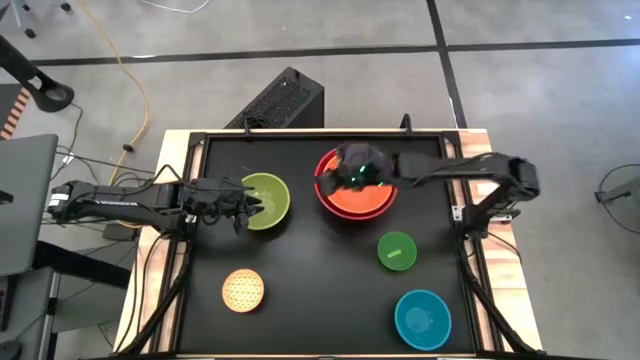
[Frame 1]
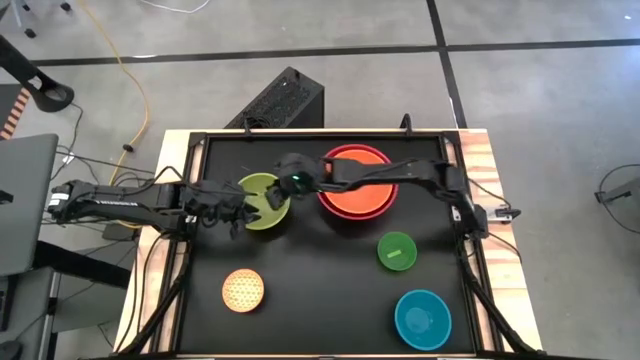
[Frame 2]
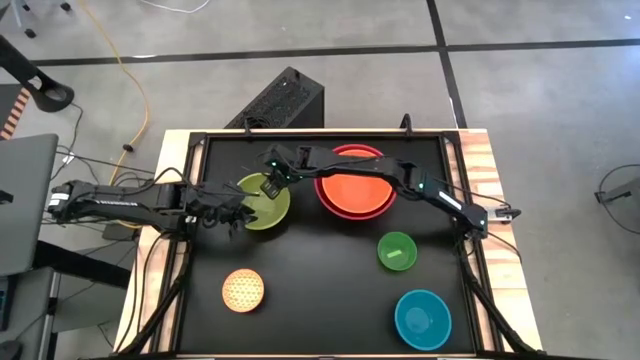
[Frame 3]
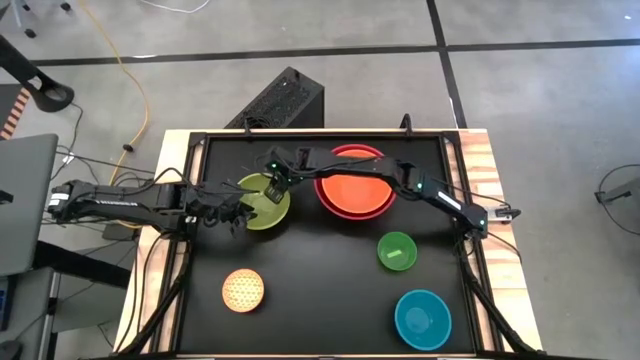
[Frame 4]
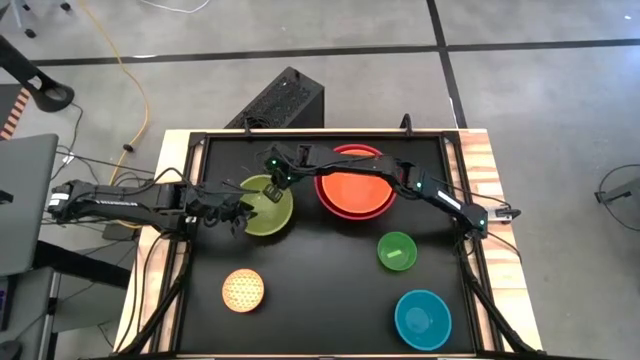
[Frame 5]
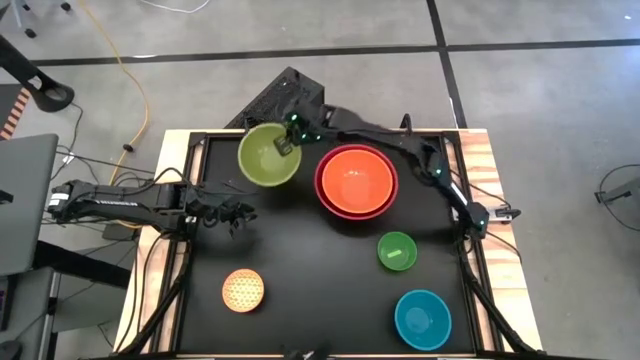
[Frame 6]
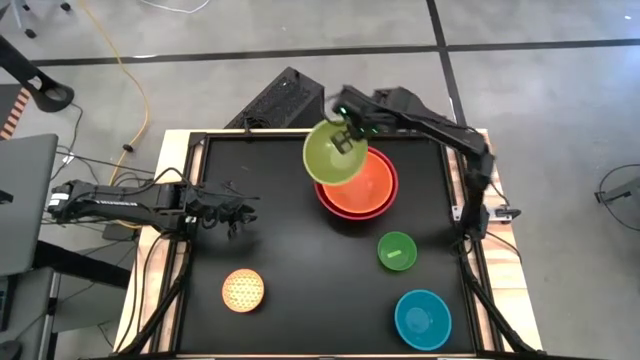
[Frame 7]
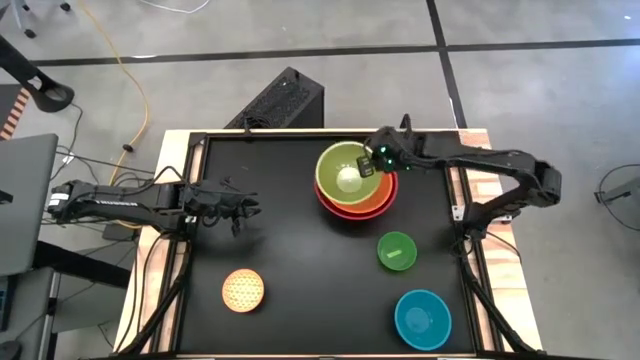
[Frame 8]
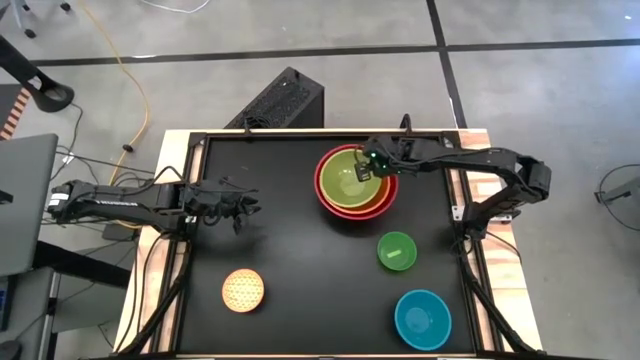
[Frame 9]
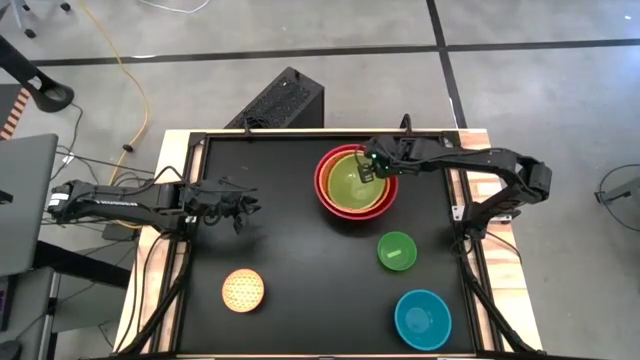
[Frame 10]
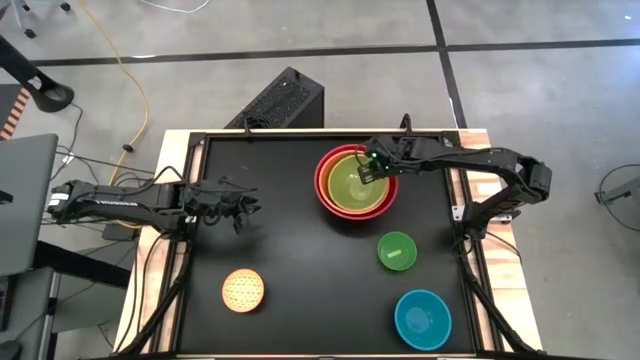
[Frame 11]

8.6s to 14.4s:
Stack the light green bowl on top of the orange bowl

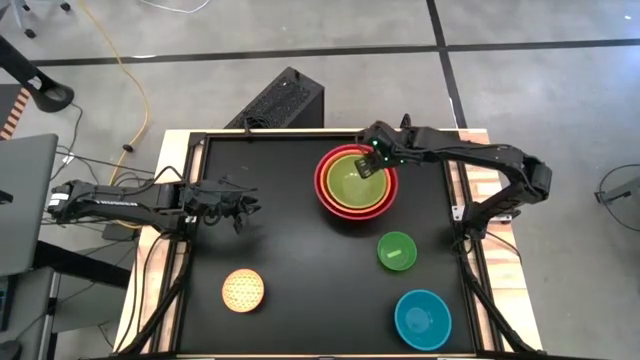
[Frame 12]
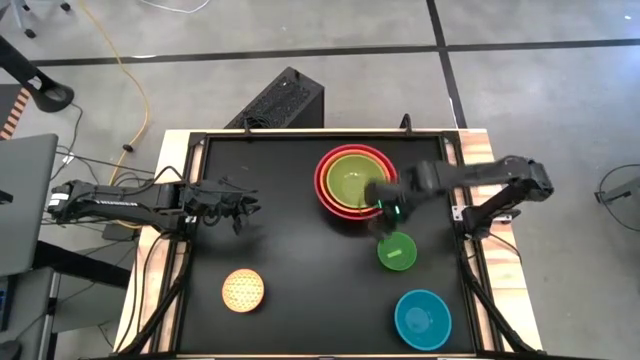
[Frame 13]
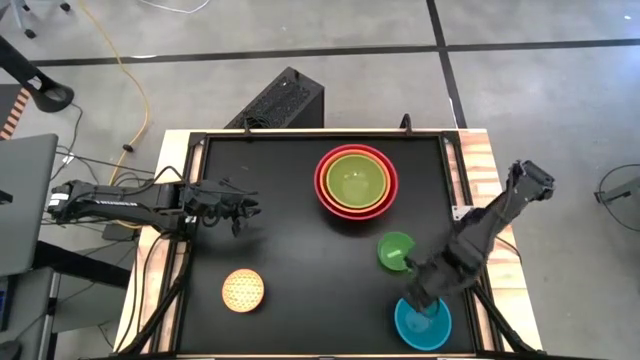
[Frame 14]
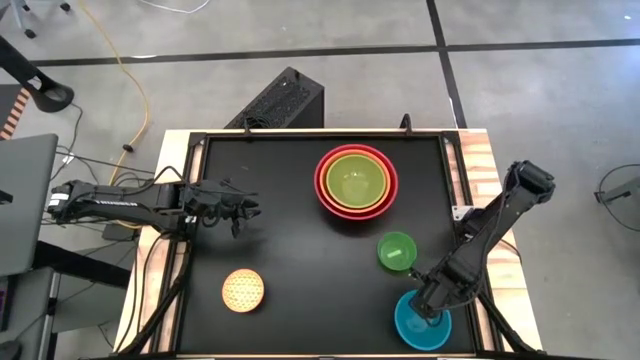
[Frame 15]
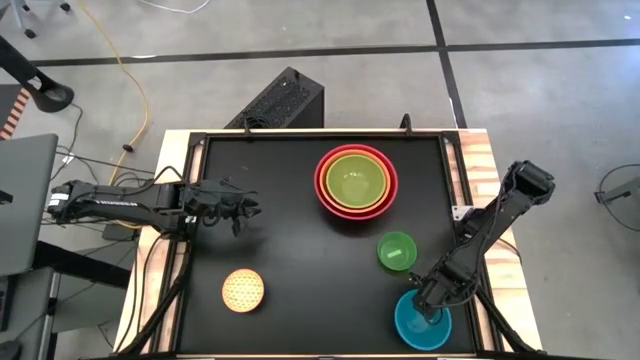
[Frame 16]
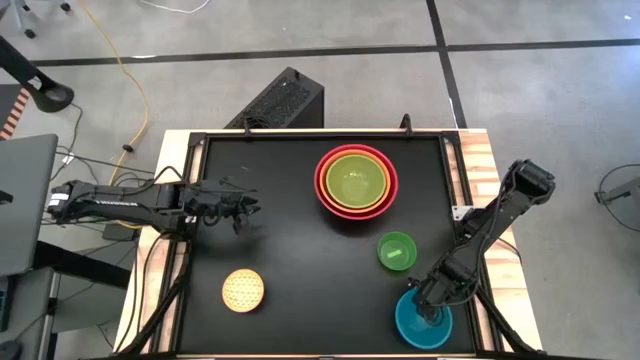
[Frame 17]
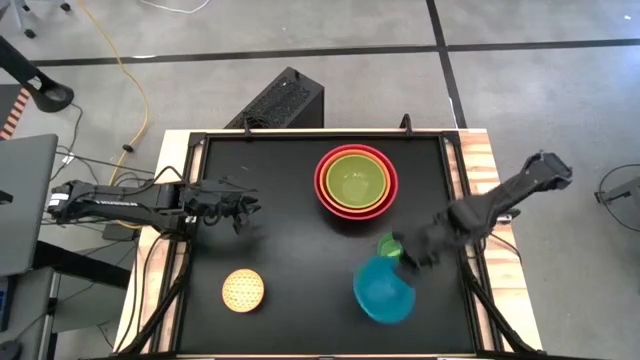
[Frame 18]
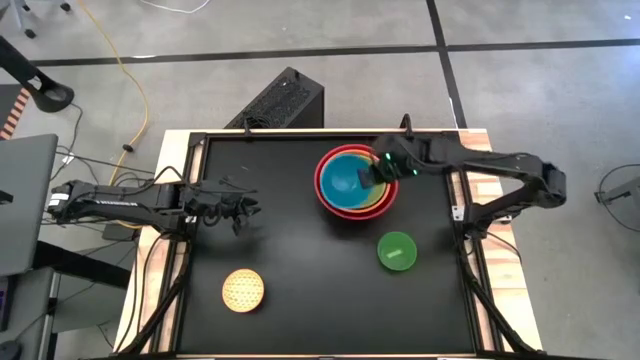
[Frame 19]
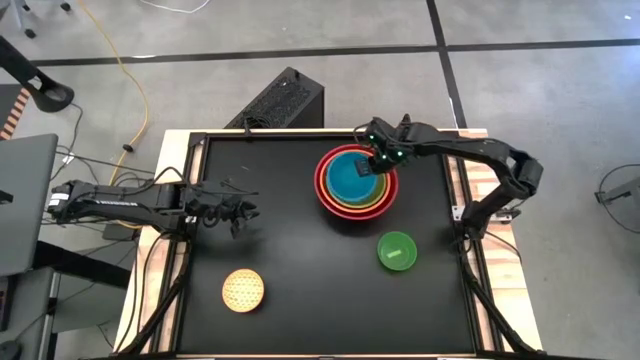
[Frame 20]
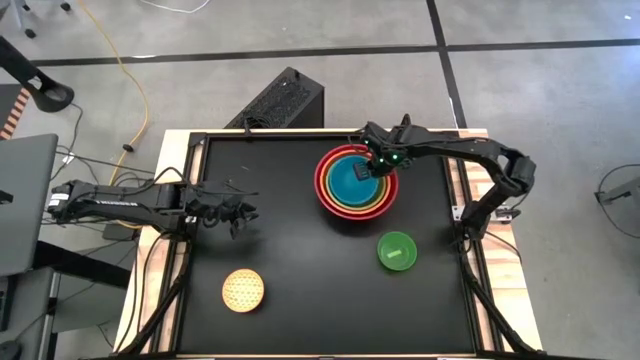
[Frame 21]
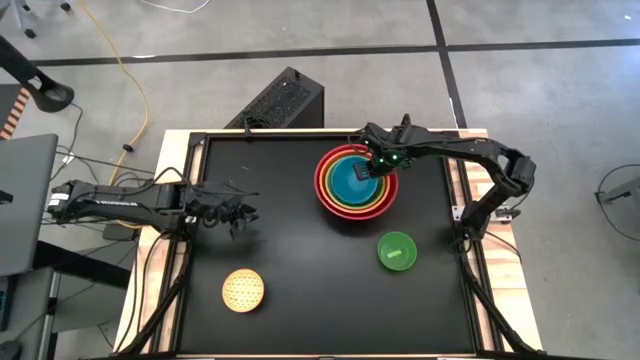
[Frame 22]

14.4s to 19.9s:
Stack the blue bowl on top of the light green bowl

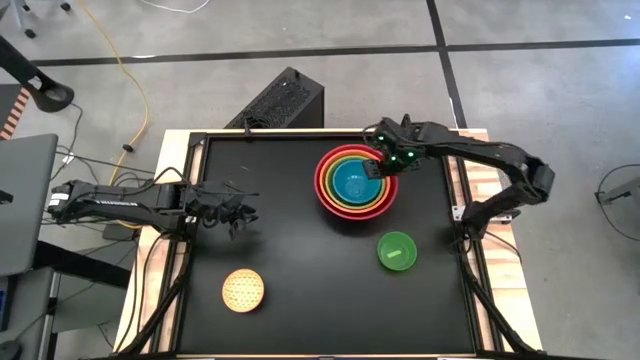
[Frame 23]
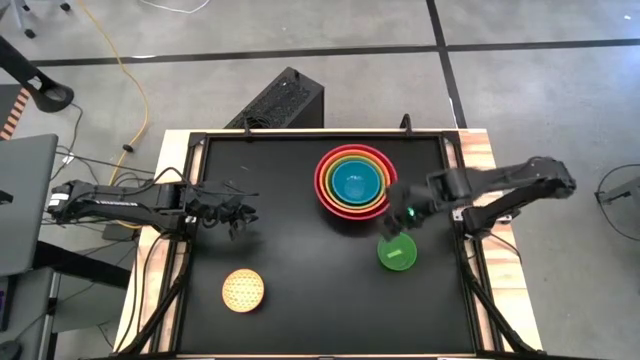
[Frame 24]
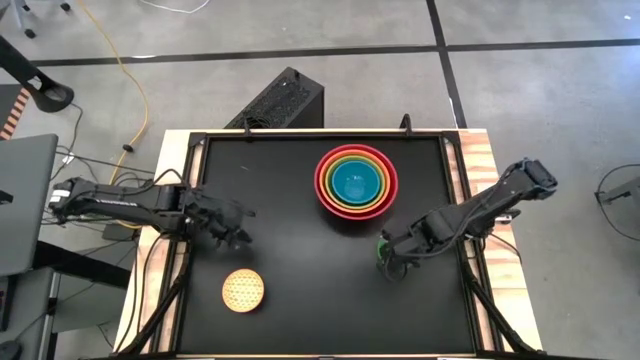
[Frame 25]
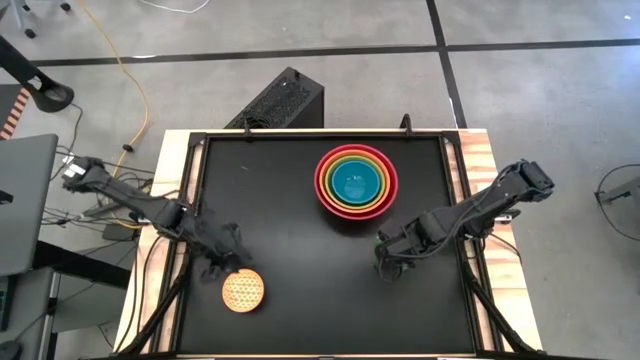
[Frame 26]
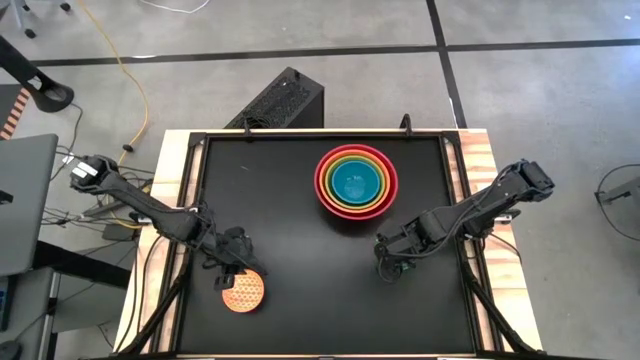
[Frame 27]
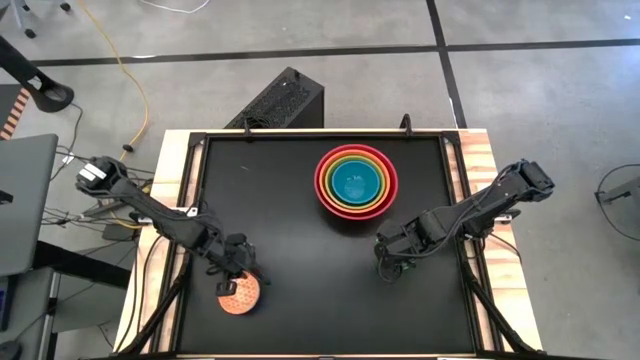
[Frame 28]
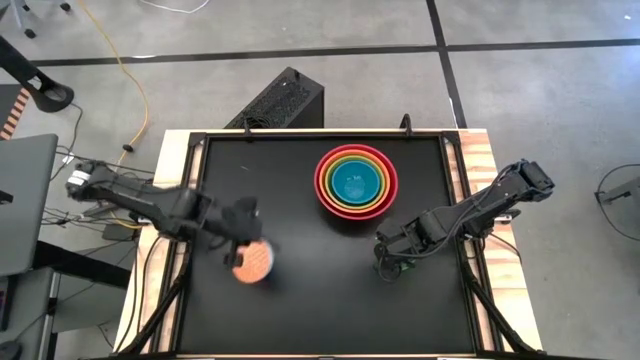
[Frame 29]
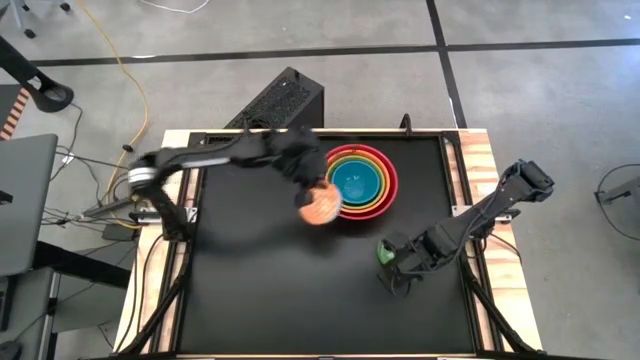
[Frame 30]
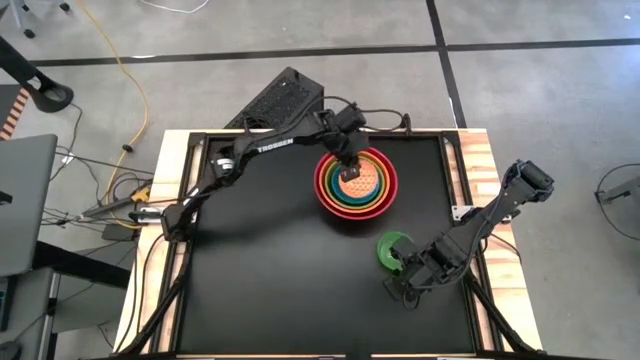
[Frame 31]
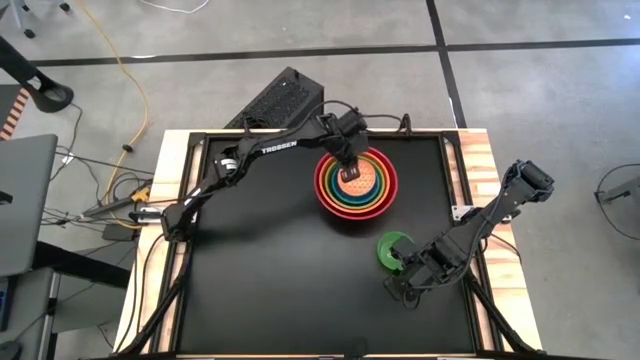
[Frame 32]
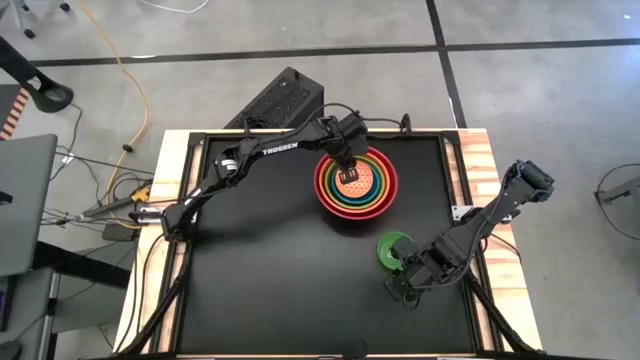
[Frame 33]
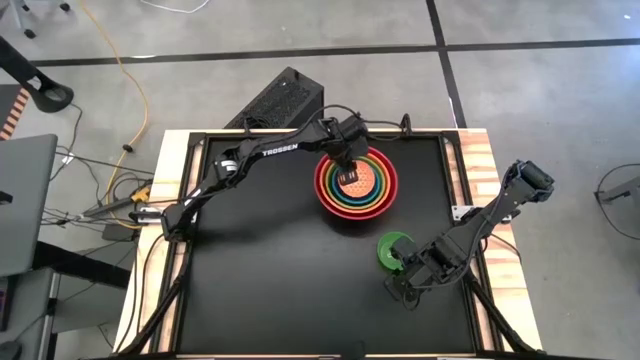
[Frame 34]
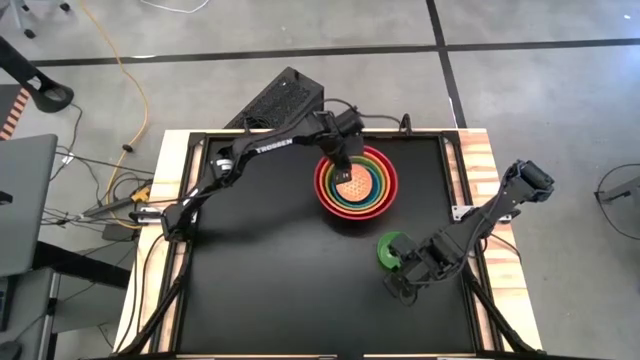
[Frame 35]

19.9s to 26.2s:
Stack the light orange bowl on top of the blue bowl

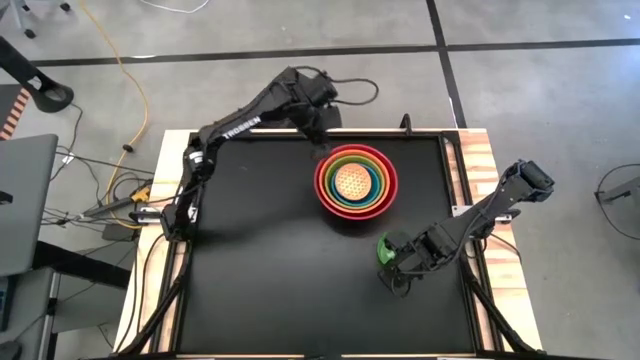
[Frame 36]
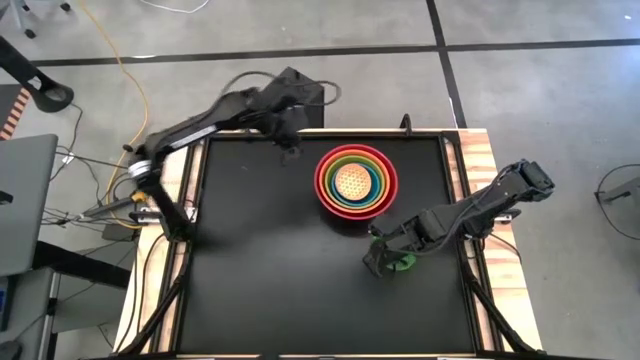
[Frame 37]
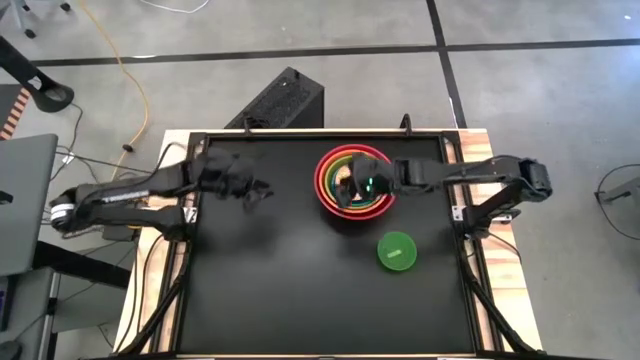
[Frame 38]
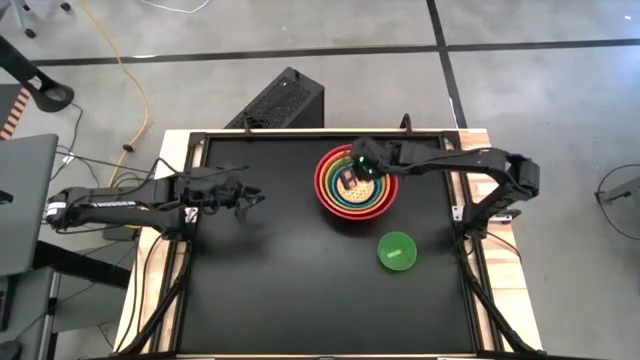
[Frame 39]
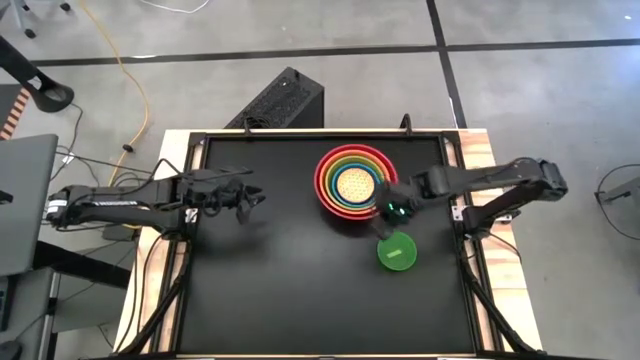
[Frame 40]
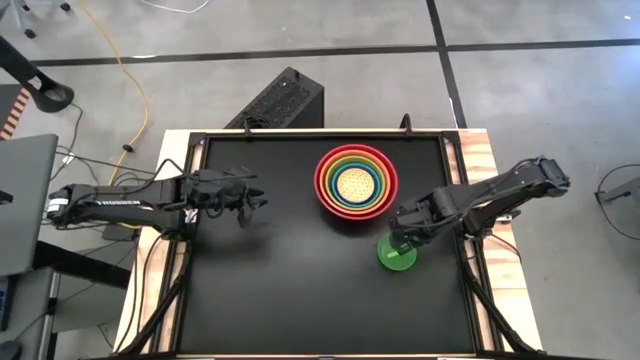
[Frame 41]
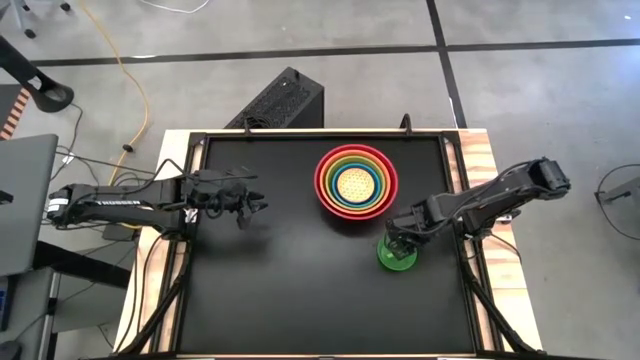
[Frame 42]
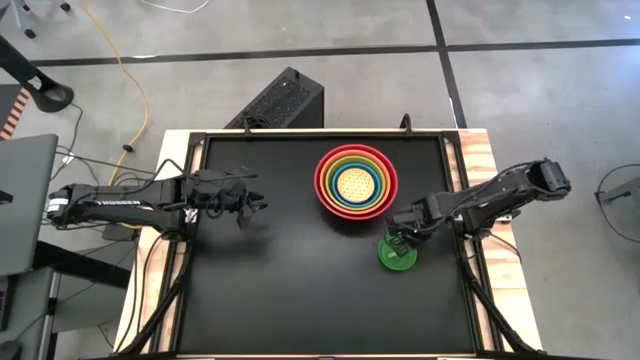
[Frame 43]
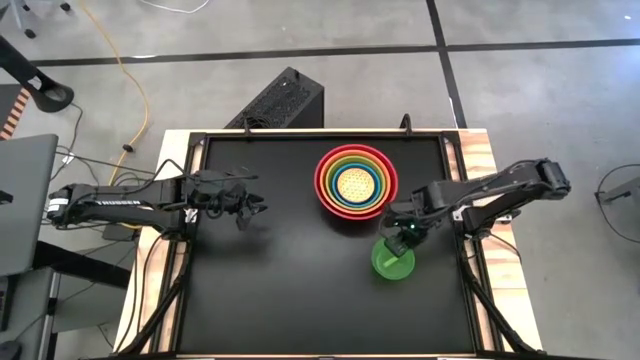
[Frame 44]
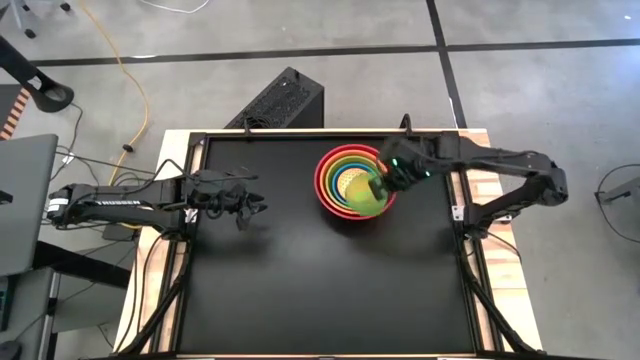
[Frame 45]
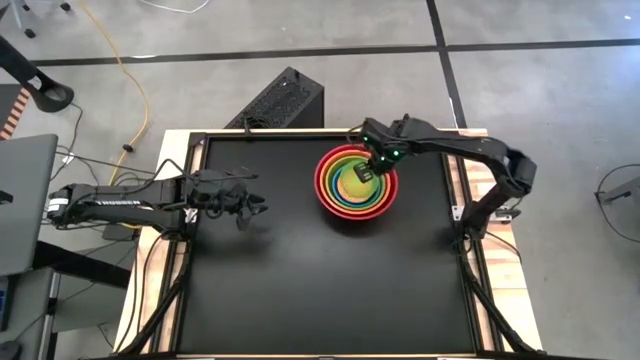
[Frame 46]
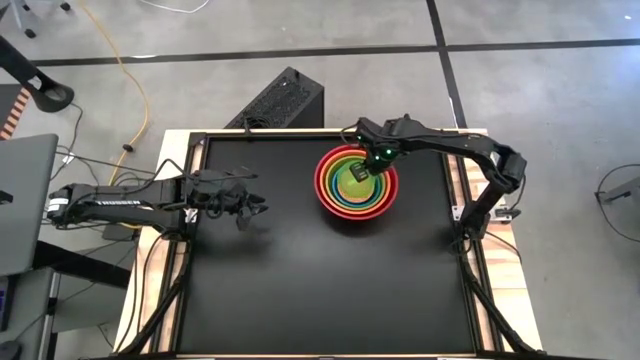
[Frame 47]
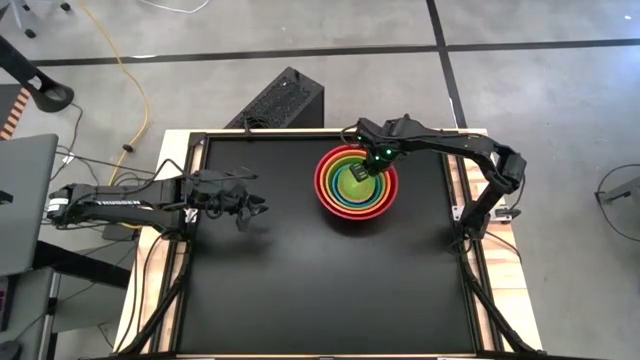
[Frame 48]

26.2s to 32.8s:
Stack the green bowl on top of the light orange bowl
